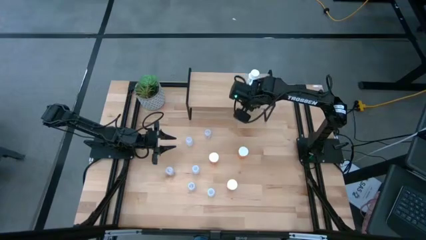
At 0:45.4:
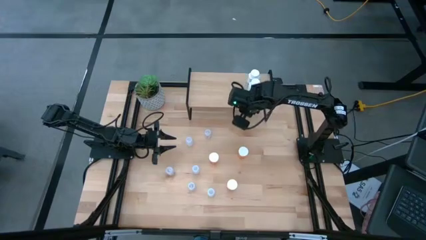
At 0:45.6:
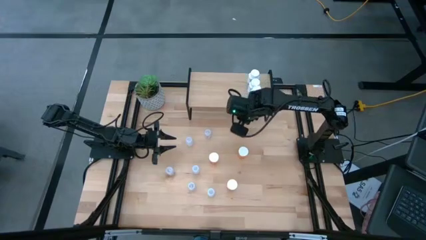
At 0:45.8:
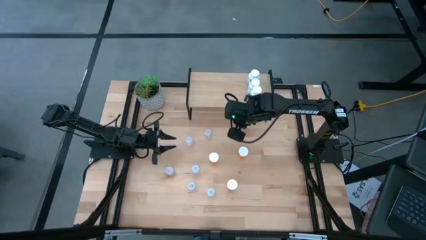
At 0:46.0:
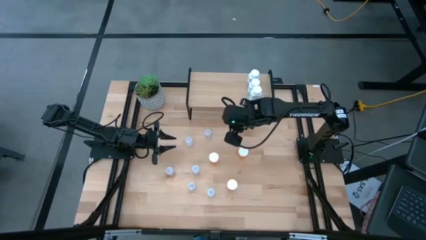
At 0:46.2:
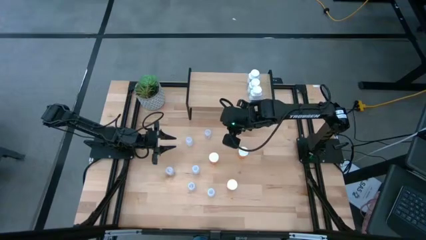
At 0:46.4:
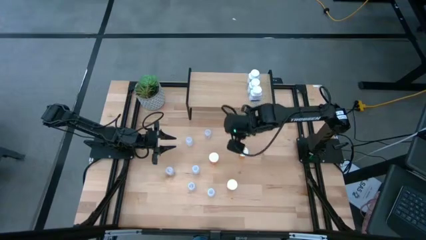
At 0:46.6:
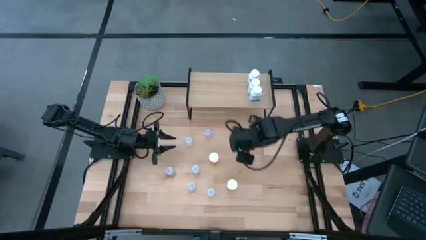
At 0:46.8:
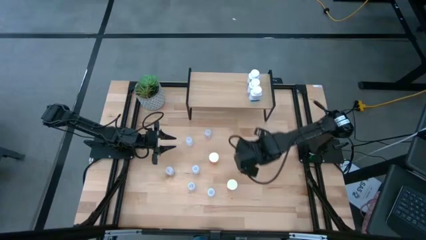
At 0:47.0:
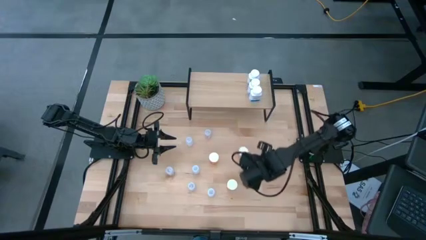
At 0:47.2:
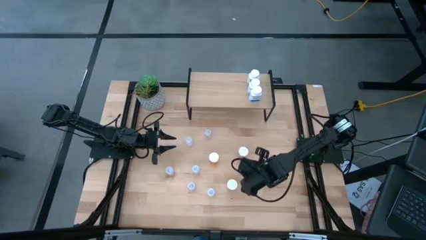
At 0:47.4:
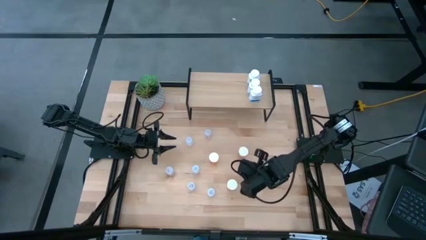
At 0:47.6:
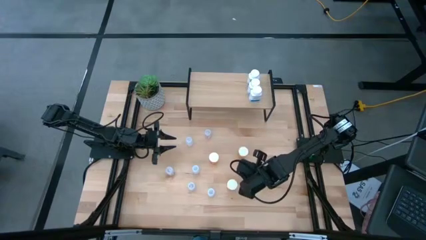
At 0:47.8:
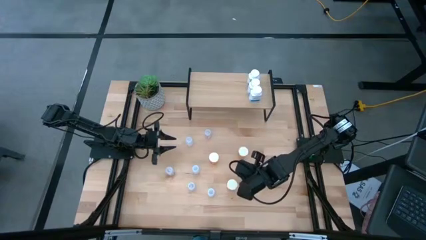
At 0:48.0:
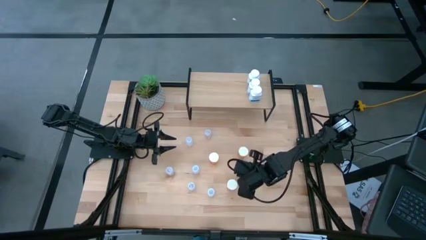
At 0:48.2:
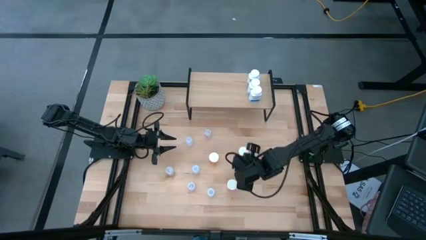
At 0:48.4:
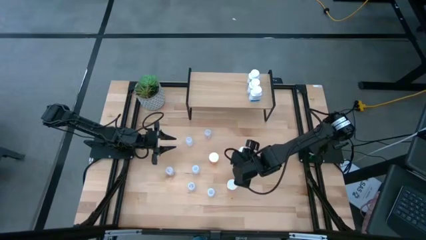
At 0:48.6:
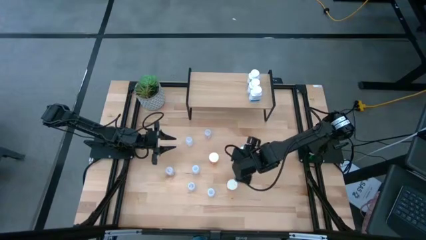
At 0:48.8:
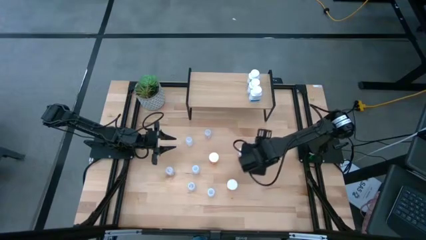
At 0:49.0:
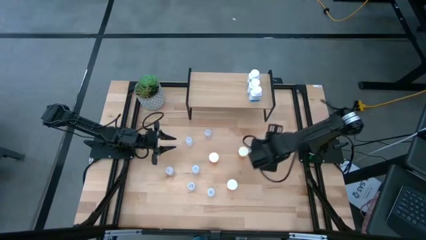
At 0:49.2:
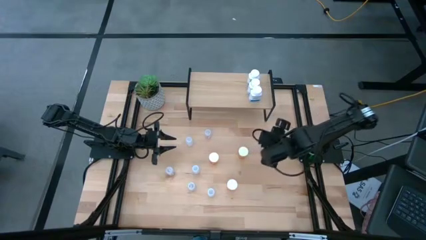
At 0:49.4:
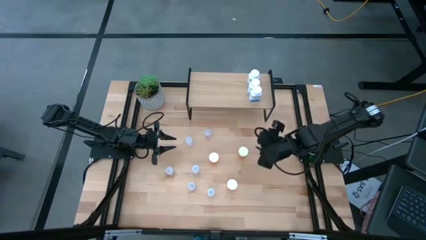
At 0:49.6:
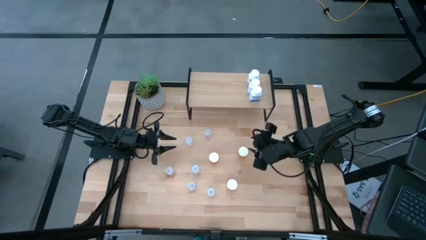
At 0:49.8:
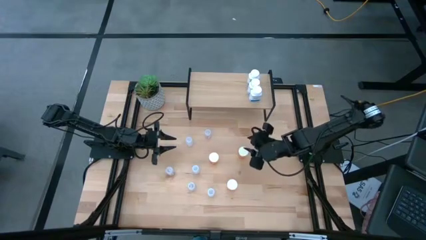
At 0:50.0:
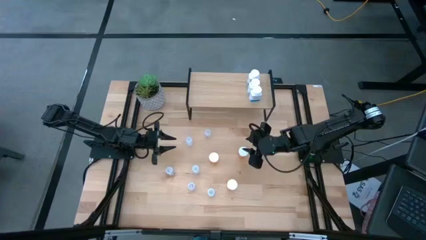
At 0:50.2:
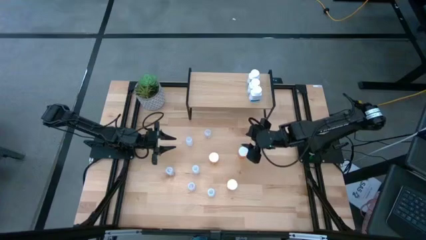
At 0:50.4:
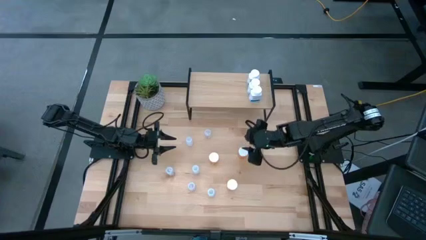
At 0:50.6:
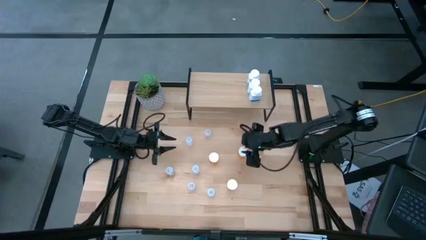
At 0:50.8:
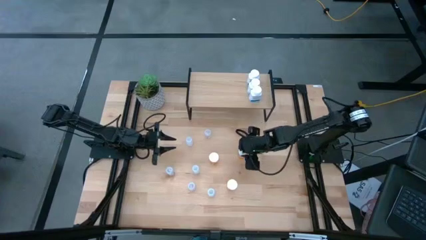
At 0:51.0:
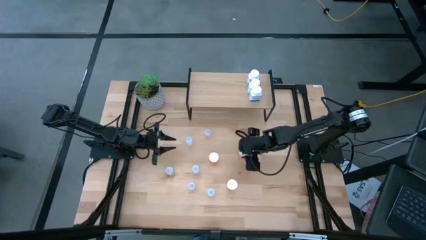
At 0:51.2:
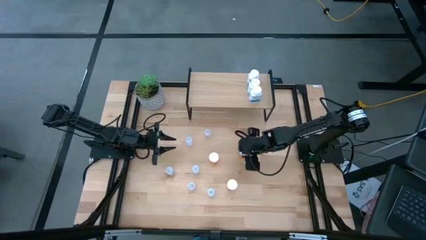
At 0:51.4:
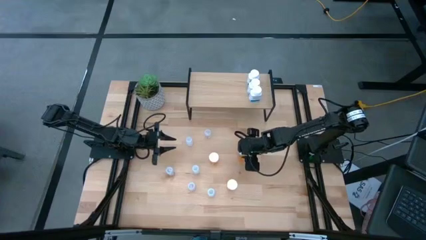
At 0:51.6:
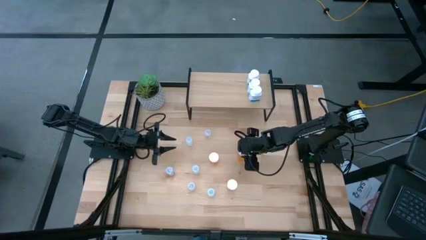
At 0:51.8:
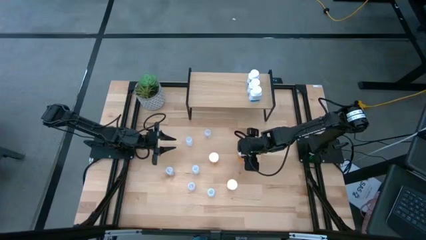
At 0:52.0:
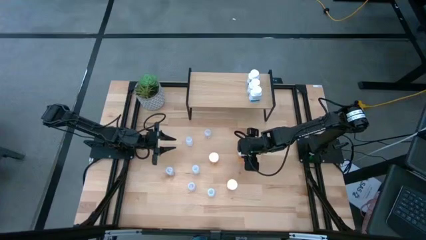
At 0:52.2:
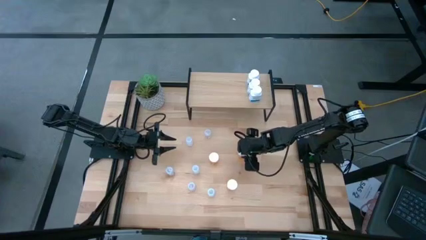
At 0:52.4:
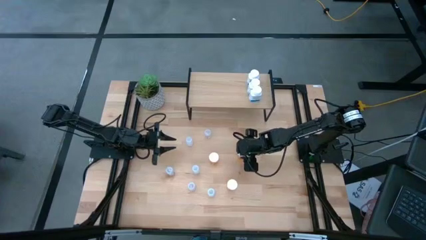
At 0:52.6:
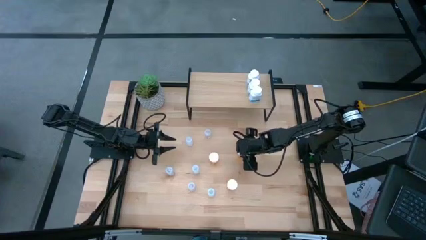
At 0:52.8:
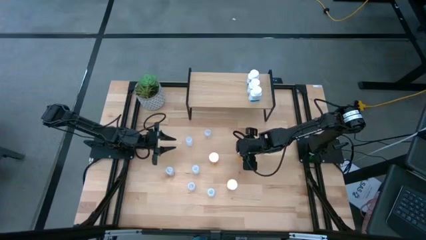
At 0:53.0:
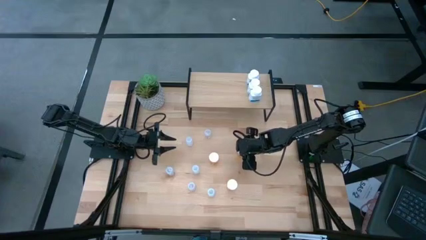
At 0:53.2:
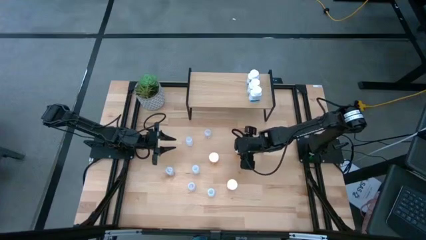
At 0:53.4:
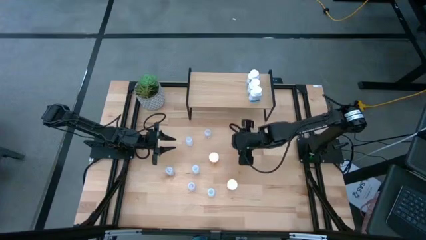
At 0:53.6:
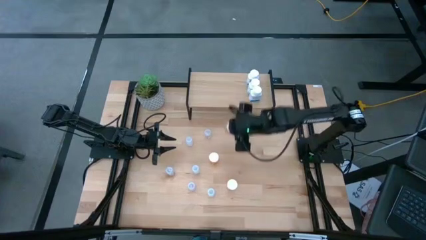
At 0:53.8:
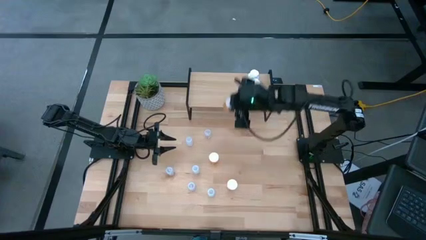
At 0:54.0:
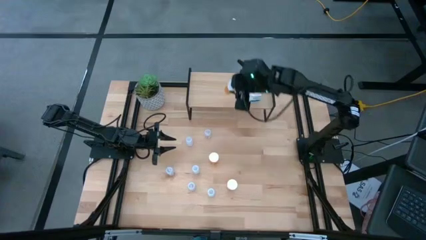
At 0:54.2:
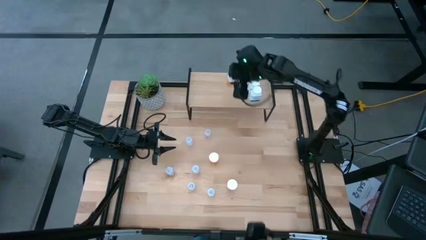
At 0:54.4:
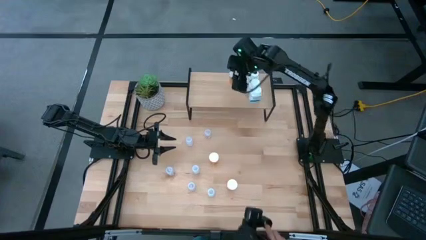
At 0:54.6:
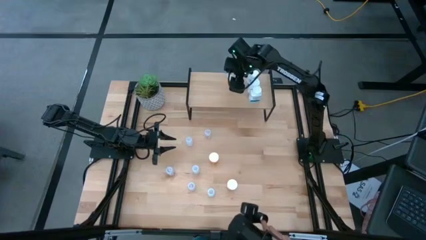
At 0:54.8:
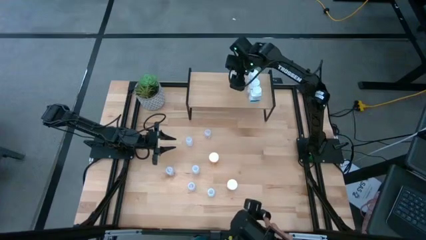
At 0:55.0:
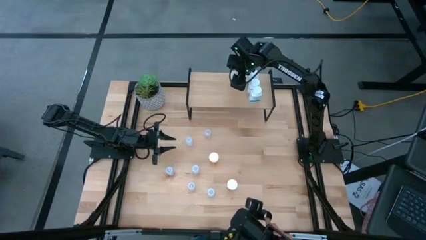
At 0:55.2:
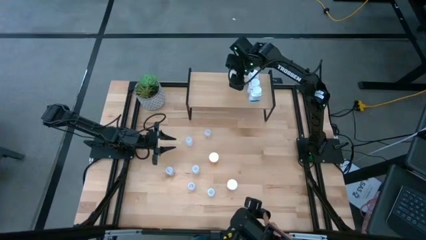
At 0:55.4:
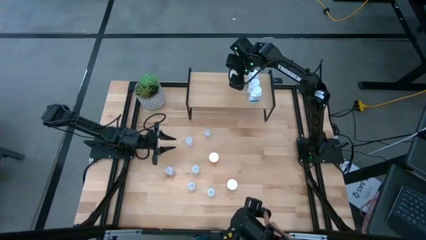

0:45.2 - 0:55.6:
Task: Pick and place medicine bottles onto shelf by color
Put the top right orange pill bottle on the shelf
